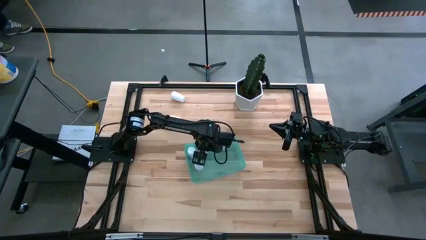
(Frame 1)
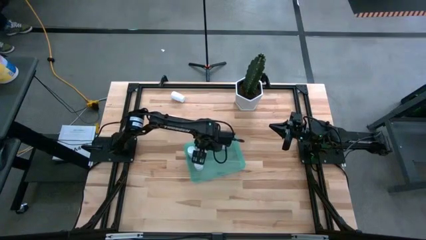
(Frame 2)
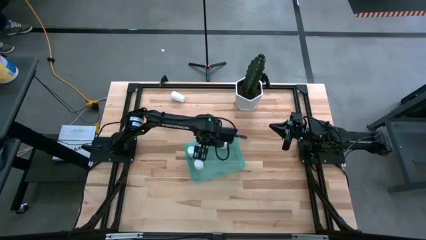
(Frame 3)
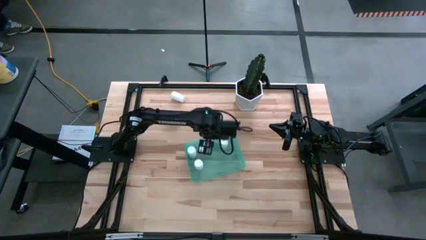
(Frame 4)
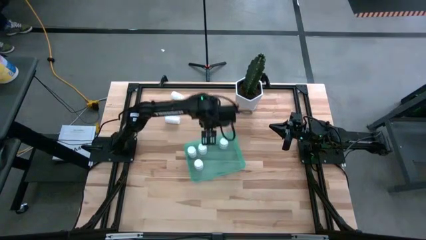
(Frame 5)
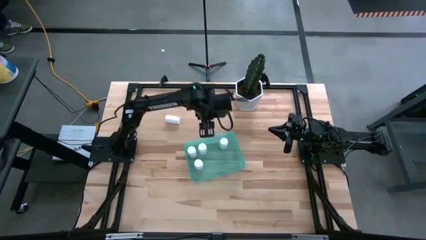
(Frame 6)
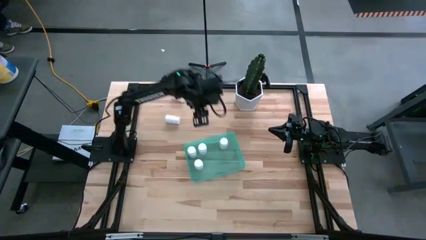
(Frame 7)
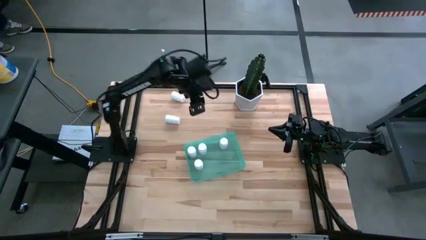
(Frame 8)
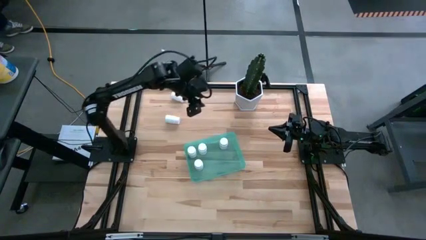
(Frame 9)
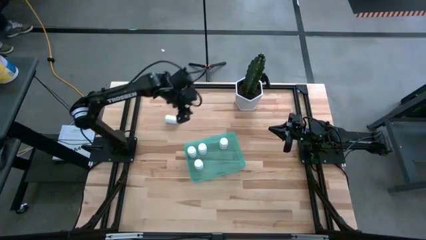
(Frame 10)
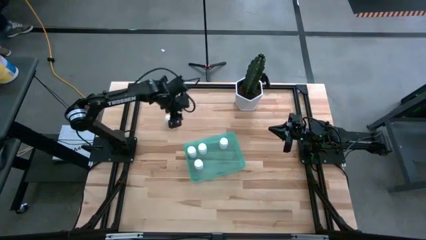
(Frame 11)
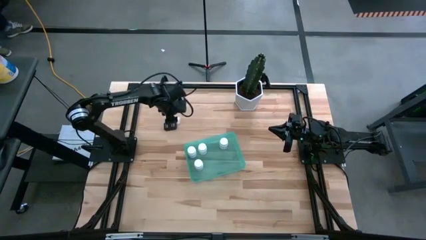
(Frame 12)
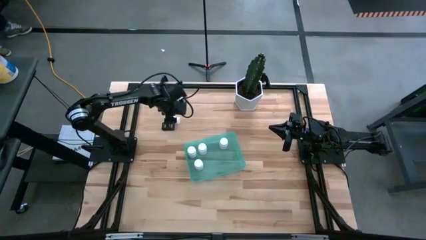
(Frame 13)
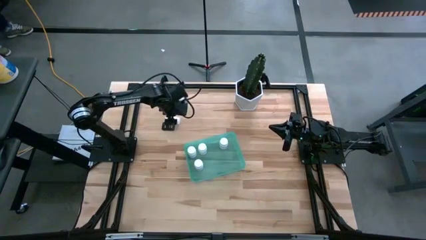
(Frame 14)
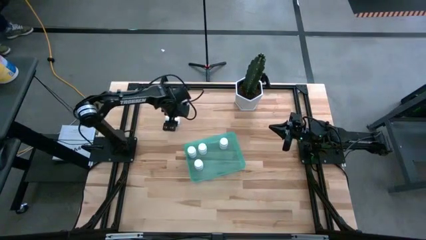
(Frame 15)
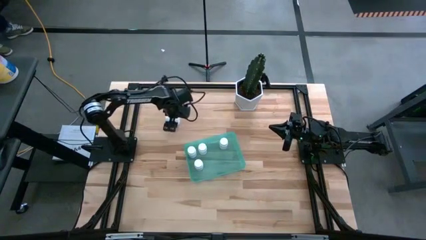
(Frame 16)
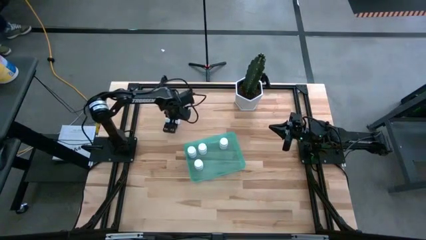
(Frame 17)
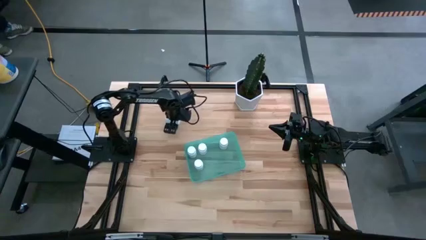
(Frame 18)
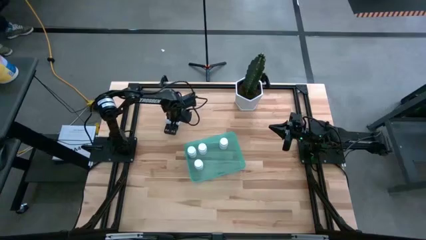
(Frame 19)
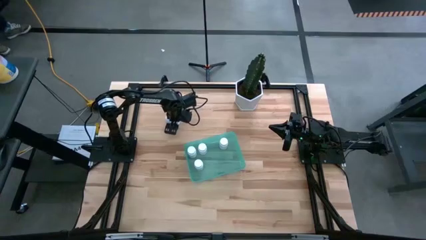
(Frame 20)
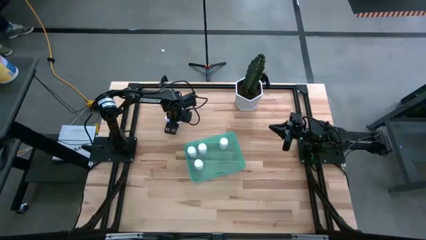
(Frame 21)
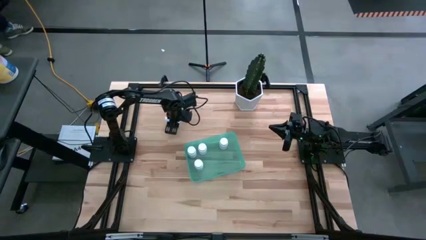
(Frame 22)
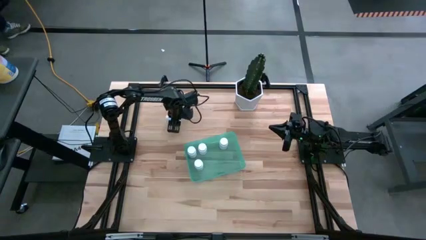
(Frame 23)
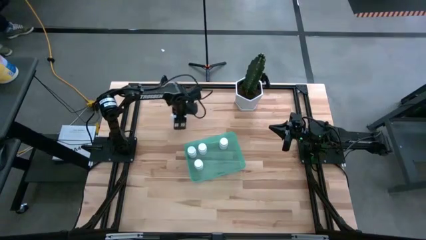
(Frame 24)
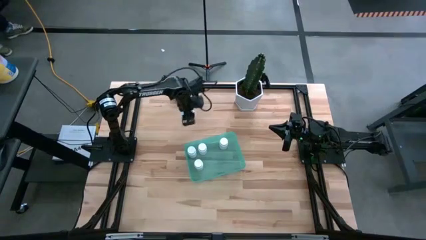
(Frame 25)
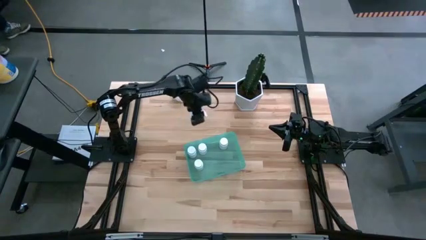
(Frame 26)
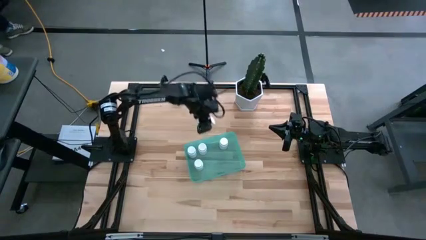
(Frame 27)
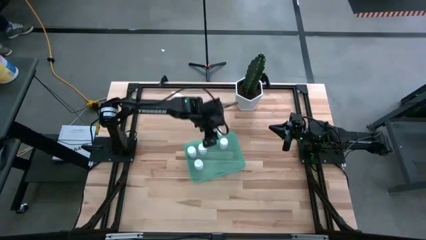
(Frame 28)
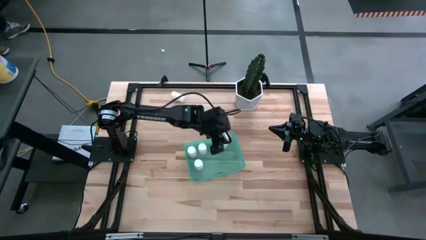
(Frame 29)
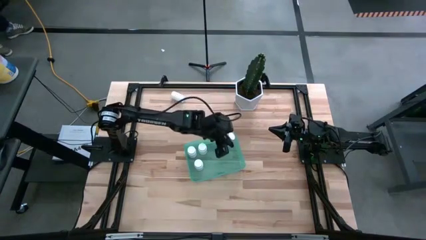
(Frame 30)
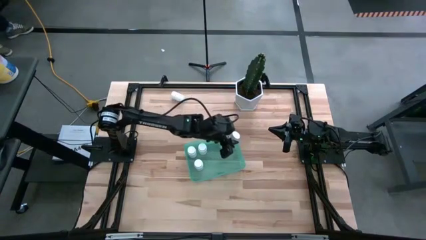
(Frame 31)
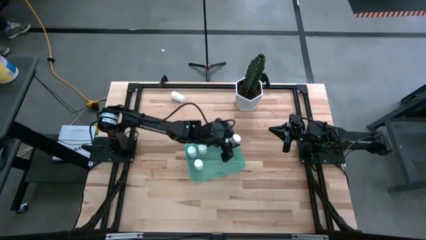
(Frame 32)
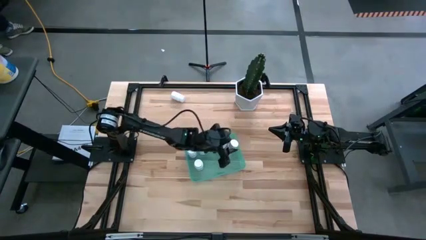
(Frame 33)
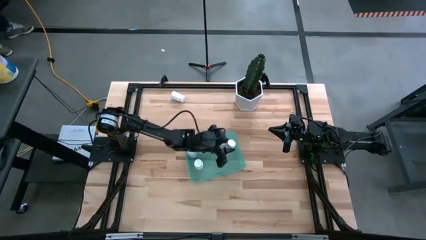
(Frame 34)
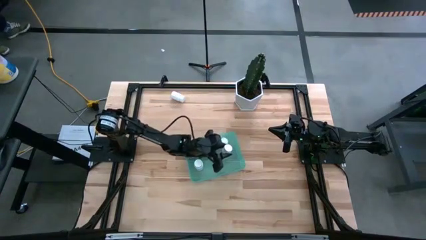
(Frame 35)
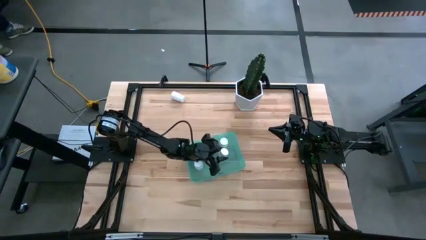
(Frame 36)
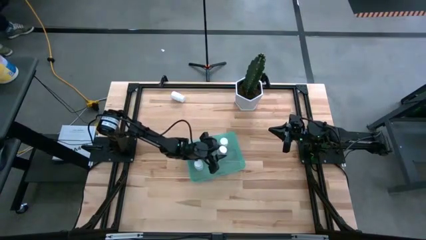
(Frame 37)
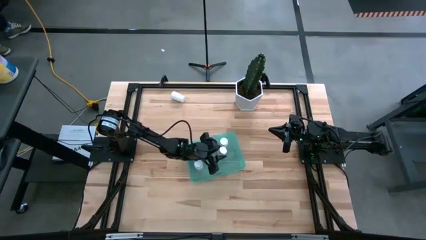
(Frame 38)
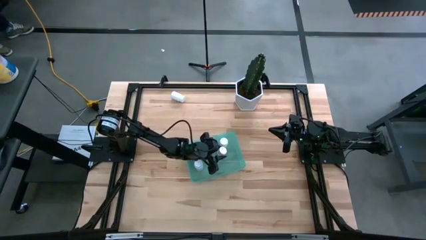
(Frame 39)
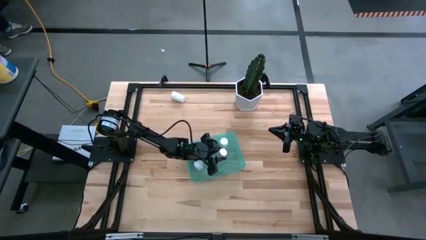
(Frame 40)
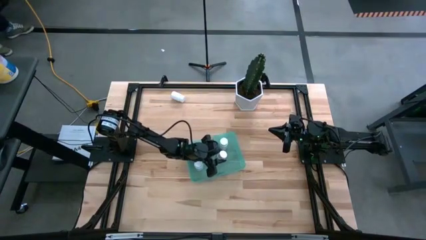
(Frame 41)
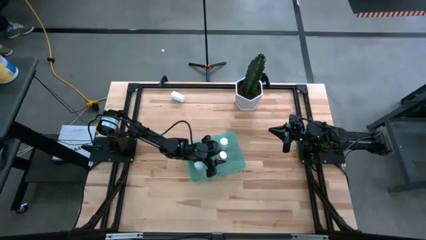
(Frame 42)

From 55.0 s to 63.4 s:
Task: Pick and place pill bottles into a basket
Put the bottom white pill bottle into the green bin

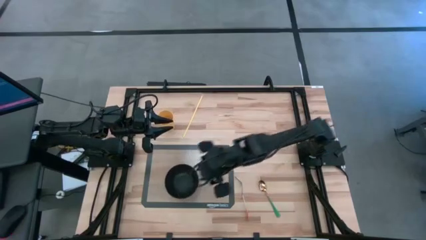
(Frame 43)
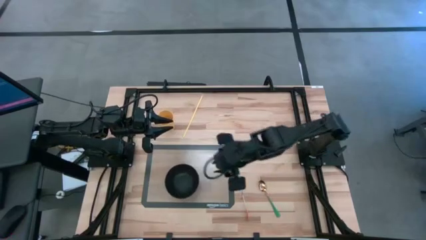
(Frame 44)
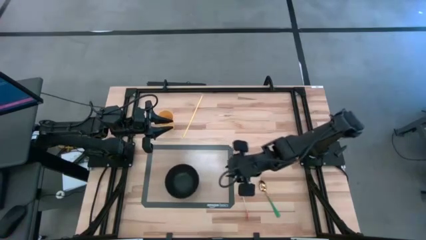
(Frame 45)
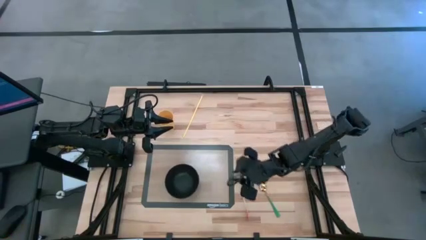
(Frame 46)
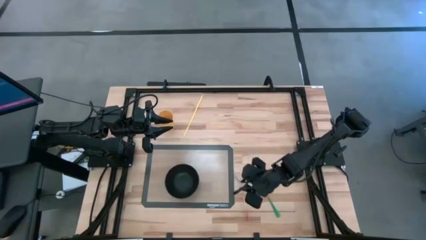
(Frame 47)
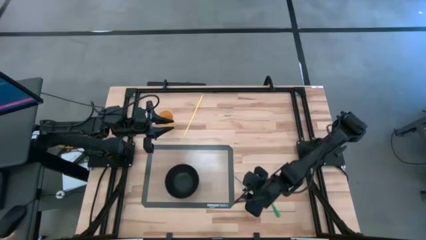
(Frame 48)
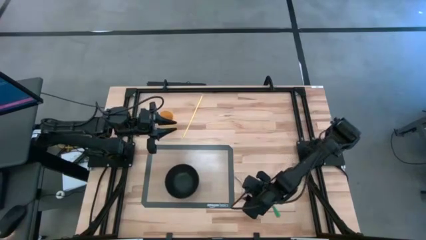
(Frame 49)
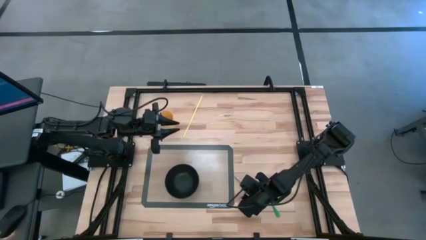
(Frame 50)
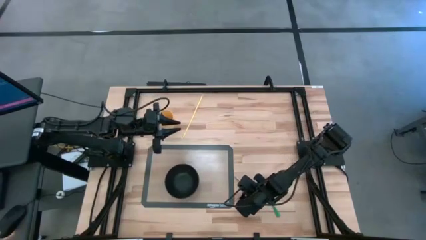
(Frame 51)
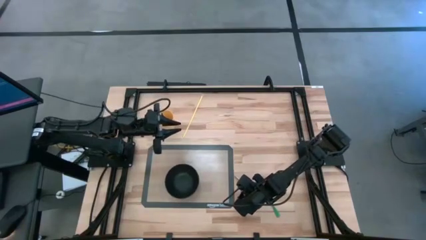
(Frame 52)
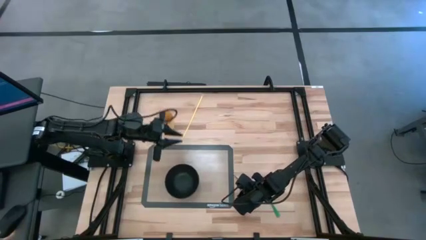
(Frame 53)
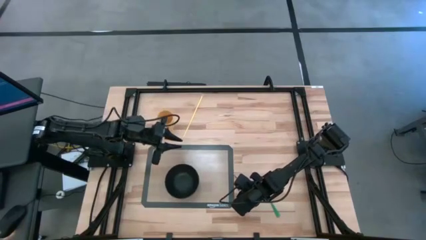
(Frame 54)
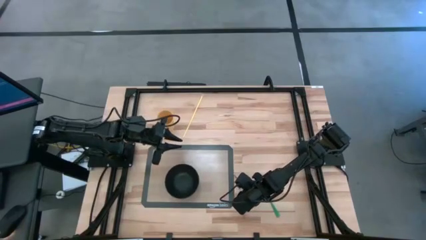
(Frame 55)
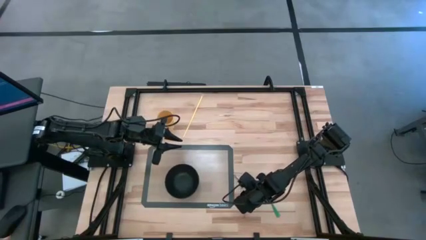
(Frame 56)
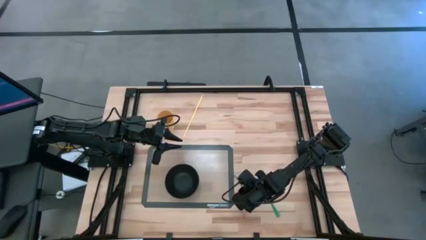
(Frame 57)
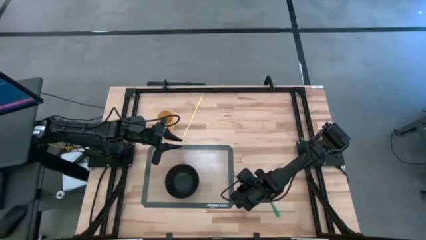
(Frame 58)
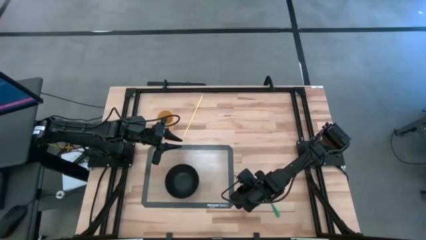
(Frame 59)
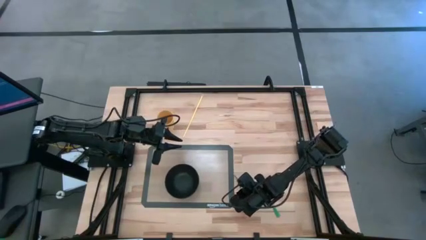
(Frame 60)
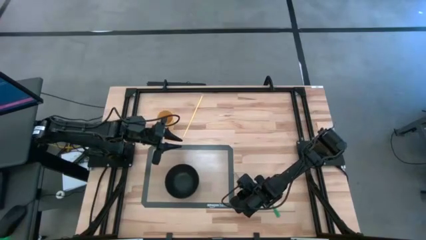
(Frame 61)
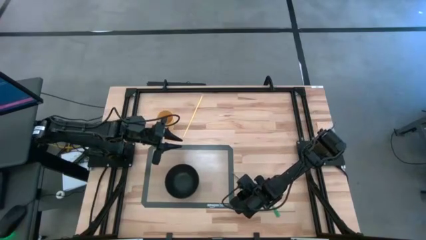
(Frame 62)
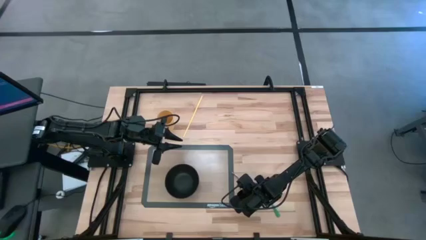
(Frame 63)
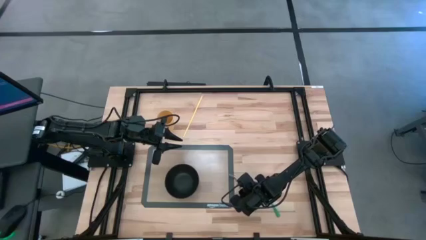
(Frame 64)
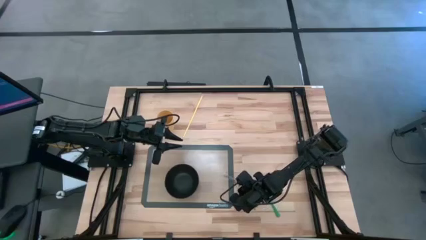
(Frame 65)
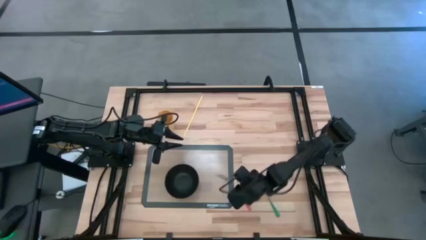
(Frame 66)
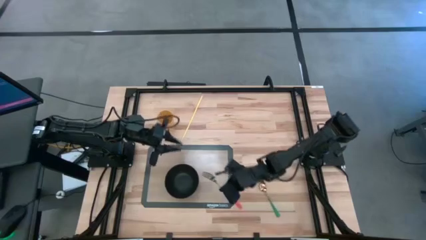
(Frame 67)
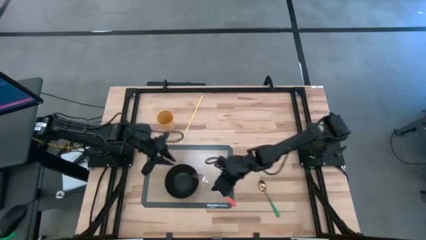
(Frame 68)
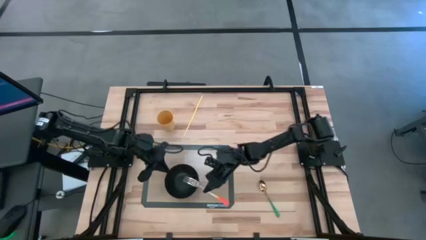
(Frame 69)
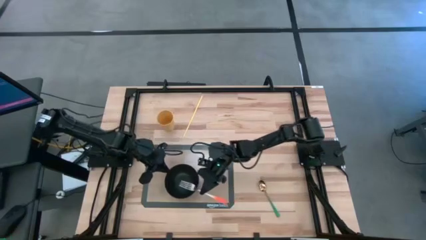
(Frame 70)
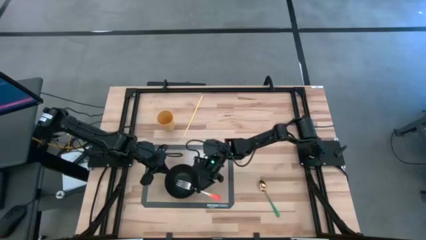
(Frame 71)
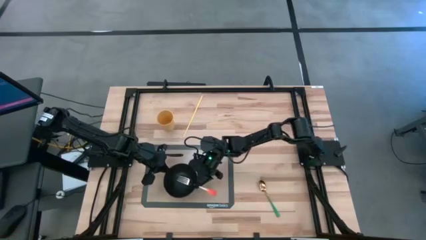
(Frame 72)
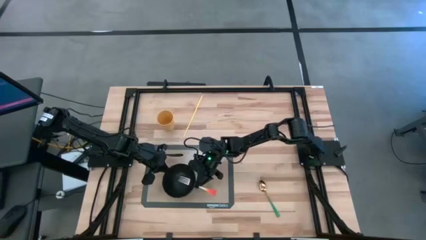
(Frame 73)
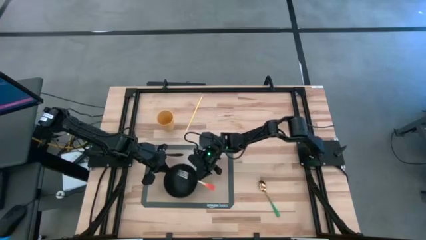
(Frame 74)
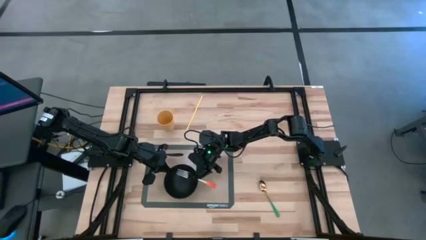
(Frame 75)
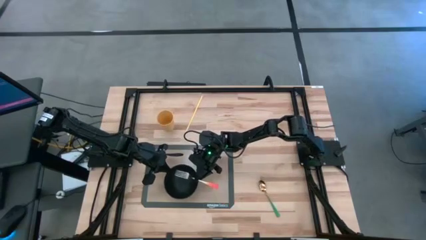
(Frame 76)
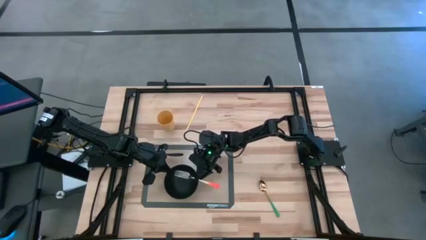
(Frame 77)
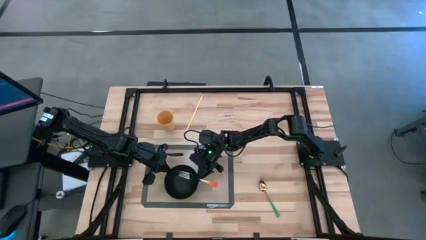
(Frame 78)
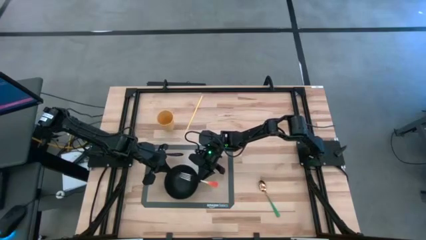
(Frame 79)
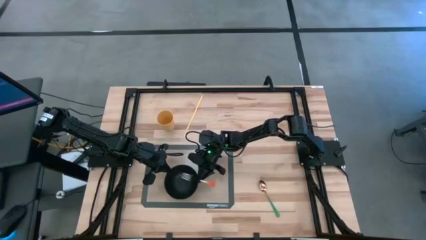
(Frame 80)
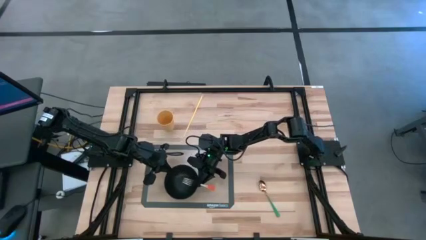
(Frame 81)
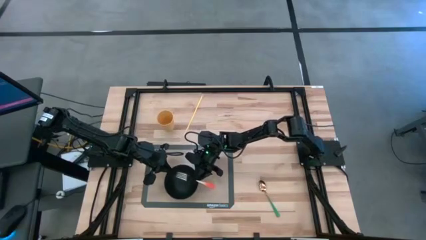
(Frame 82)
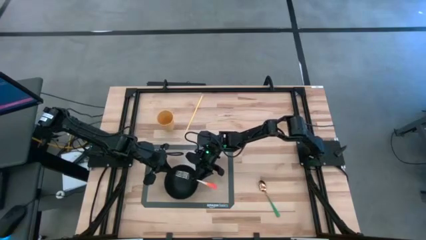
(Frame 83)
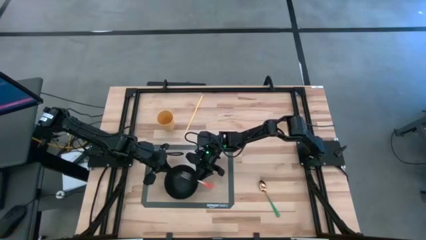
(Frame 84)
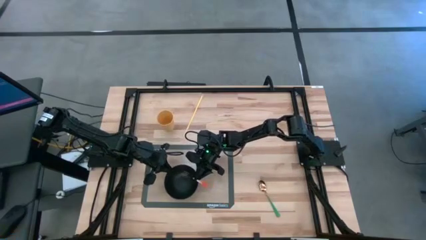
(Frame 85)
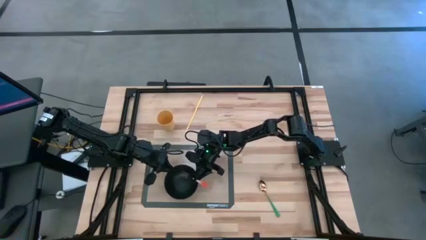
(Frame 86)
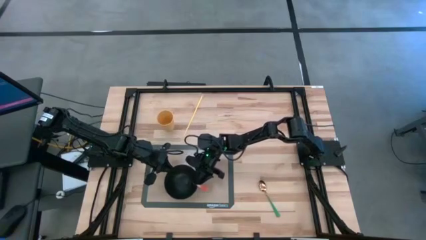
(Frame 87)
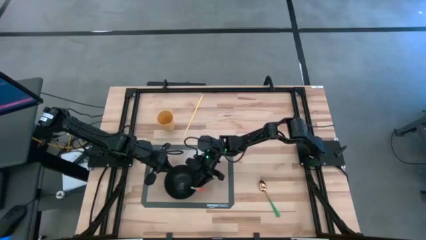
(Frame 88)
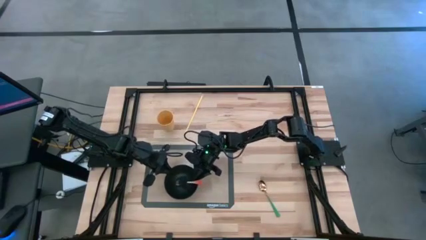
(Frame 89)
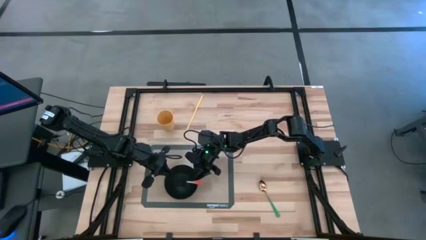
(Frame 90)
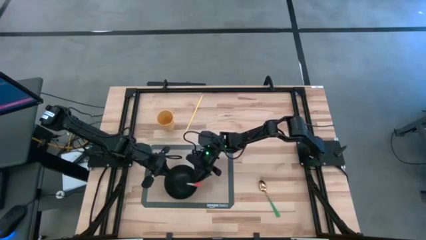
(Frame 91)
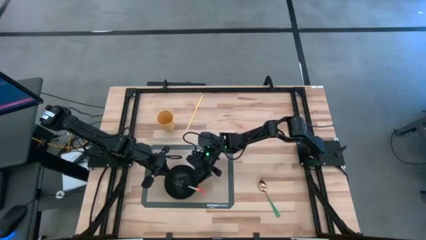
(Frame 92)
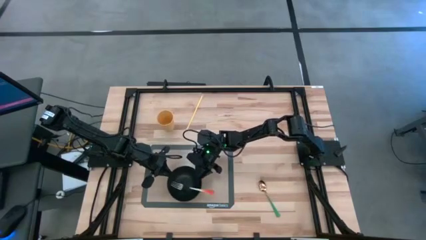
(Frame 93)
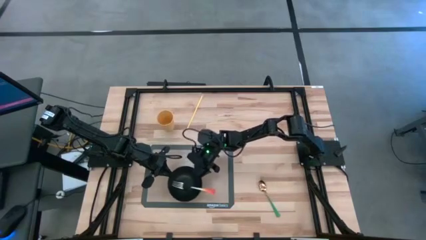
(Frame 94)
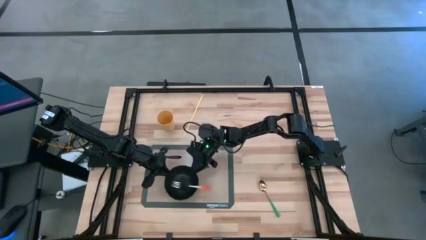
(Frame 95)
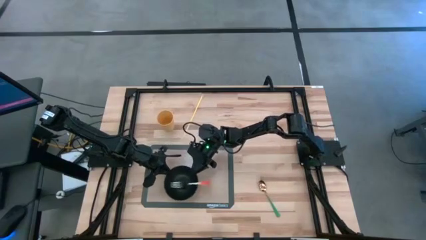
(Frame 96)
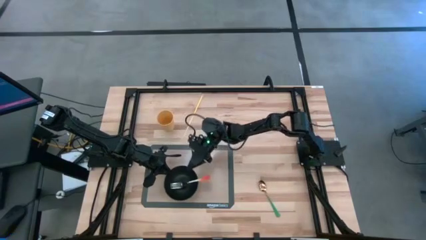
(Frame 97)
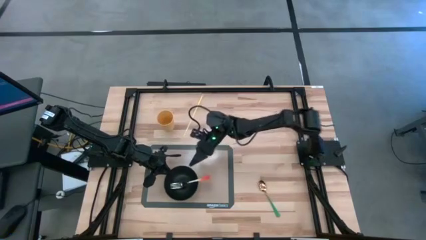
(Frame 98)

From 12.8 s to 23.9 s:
Task: Pick & Place Utensil
Put the orange fork into the black bowl
